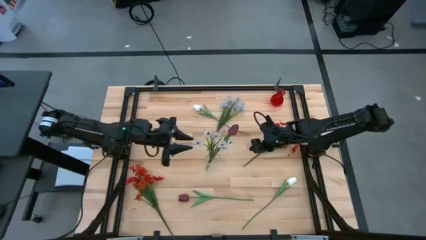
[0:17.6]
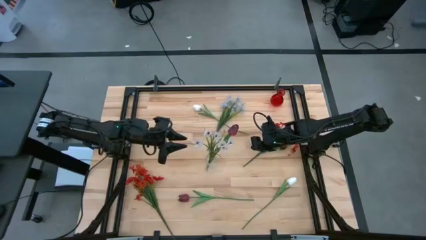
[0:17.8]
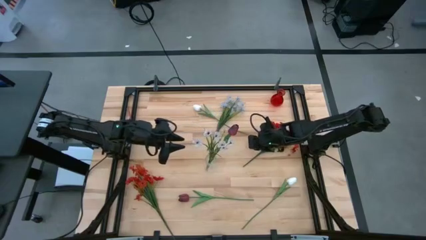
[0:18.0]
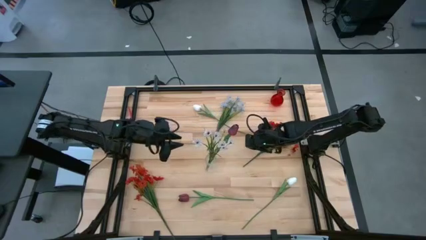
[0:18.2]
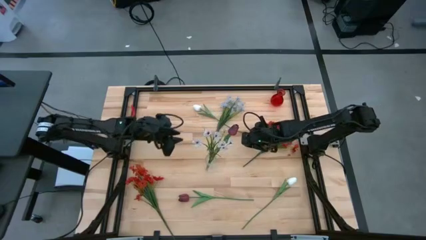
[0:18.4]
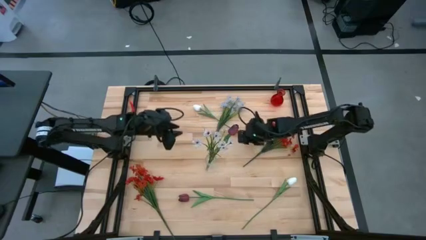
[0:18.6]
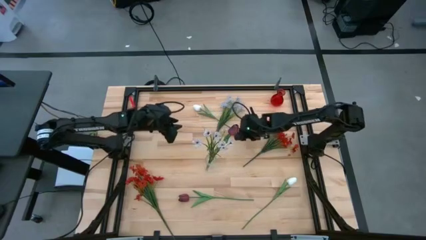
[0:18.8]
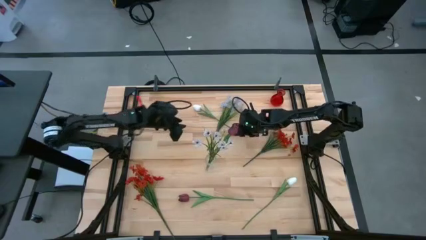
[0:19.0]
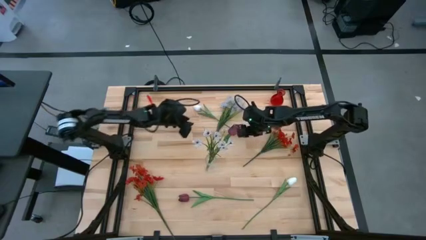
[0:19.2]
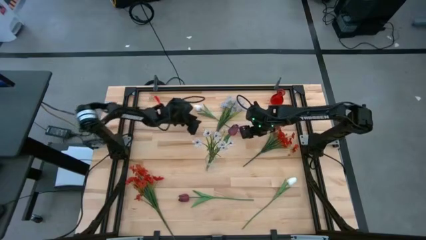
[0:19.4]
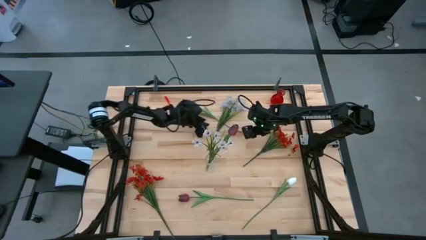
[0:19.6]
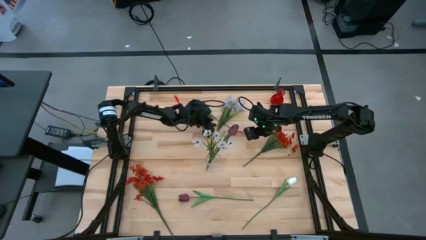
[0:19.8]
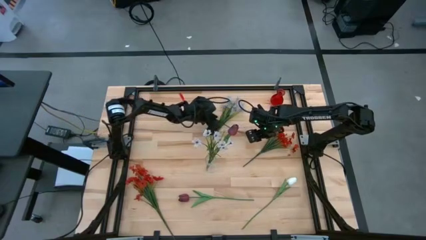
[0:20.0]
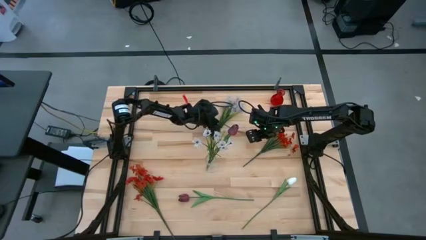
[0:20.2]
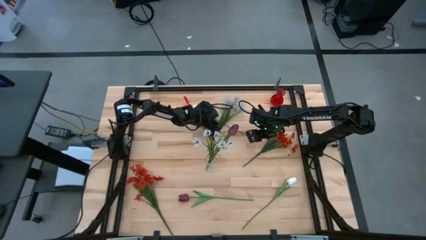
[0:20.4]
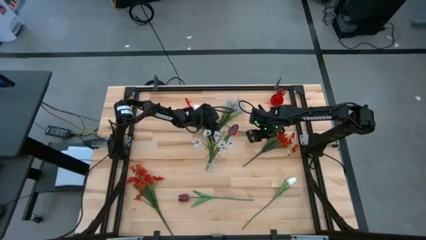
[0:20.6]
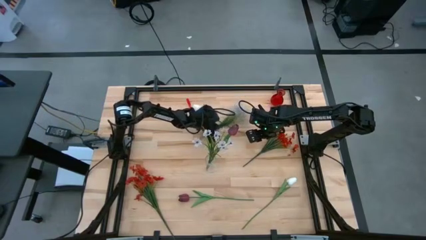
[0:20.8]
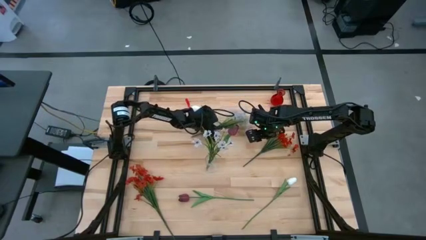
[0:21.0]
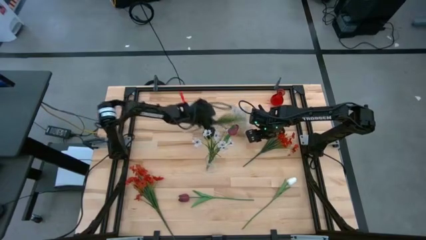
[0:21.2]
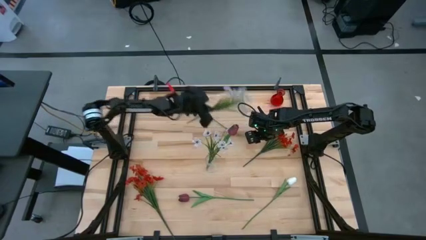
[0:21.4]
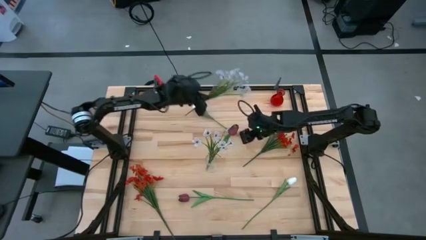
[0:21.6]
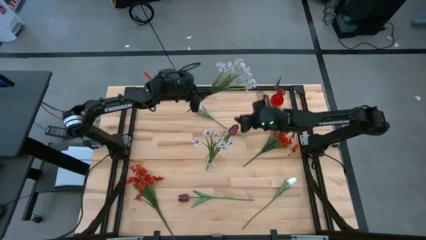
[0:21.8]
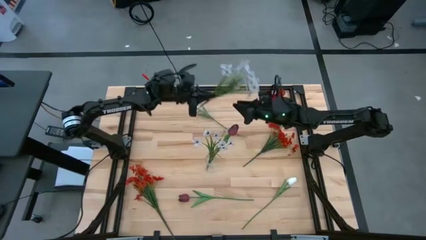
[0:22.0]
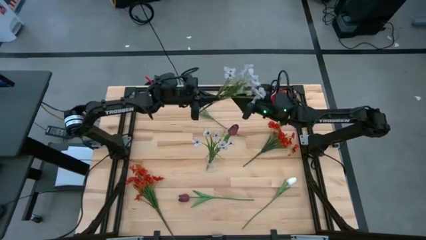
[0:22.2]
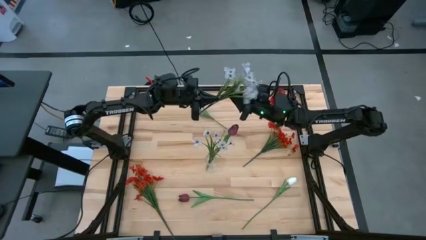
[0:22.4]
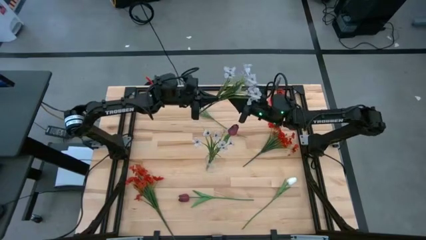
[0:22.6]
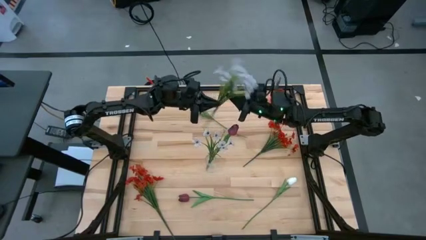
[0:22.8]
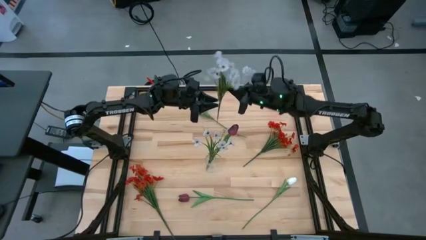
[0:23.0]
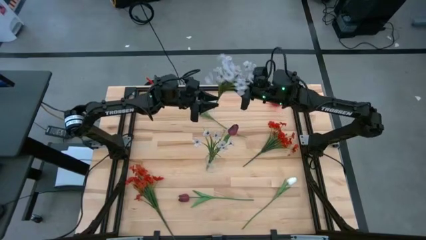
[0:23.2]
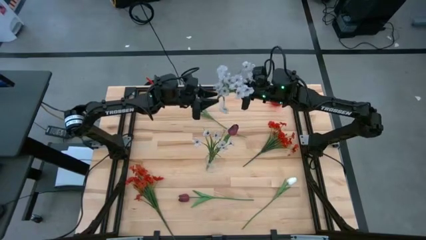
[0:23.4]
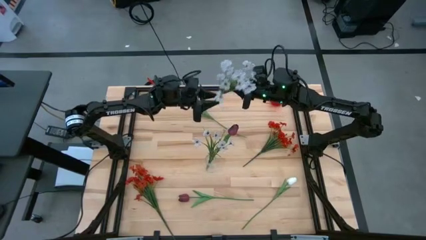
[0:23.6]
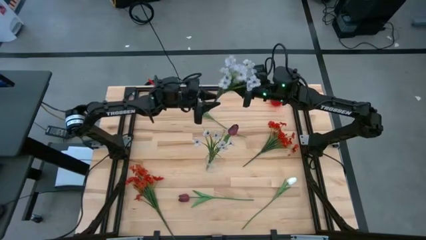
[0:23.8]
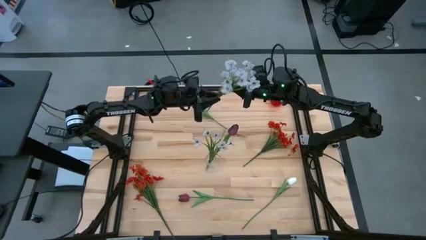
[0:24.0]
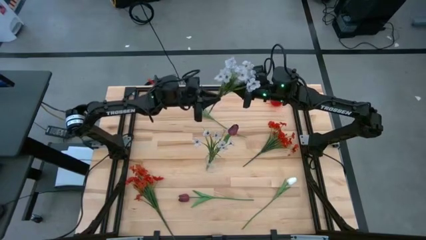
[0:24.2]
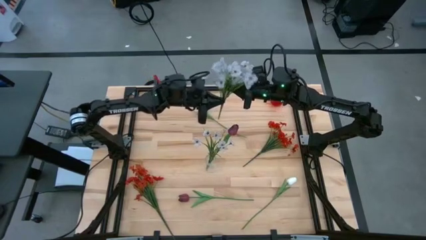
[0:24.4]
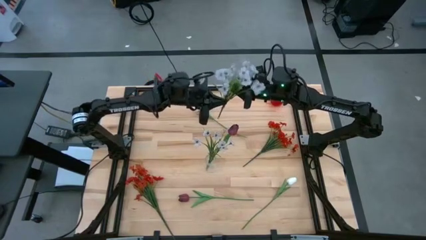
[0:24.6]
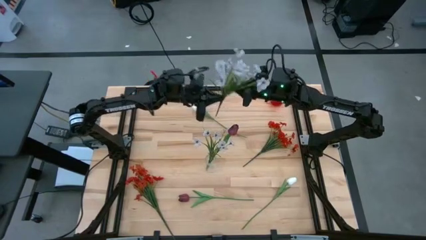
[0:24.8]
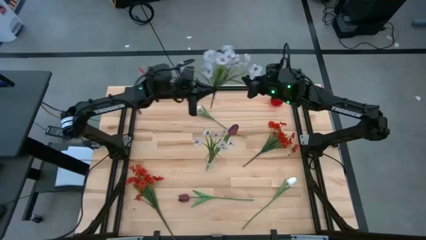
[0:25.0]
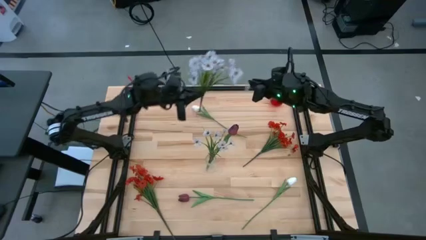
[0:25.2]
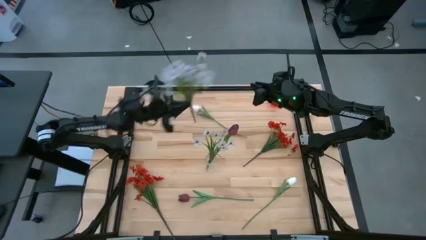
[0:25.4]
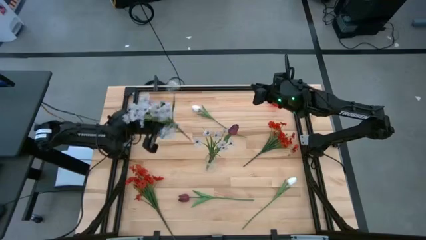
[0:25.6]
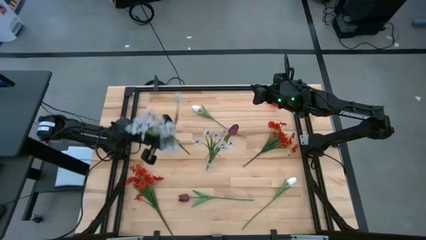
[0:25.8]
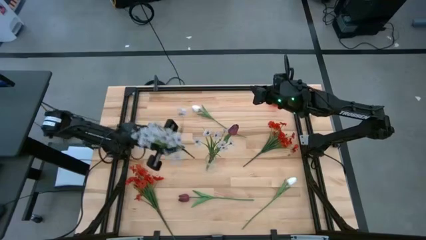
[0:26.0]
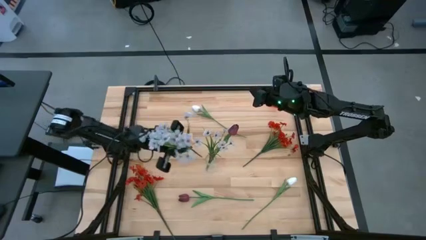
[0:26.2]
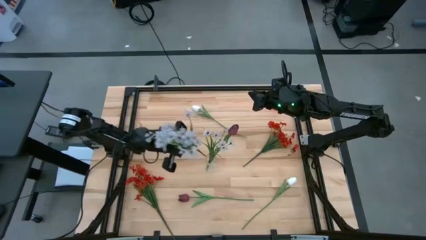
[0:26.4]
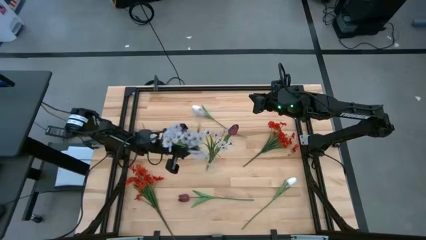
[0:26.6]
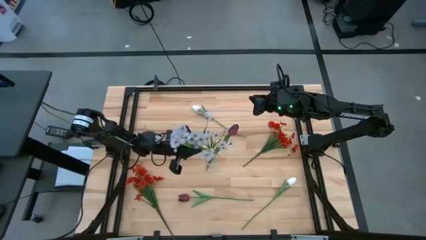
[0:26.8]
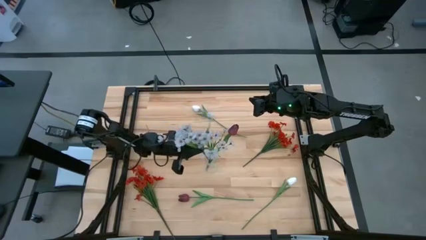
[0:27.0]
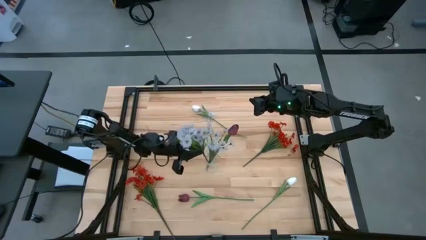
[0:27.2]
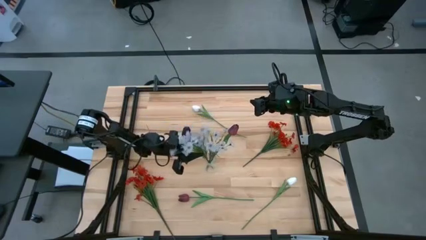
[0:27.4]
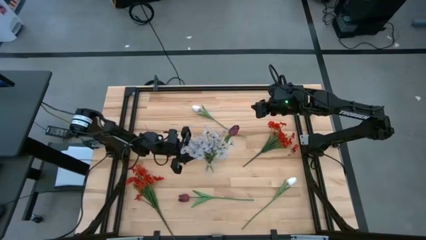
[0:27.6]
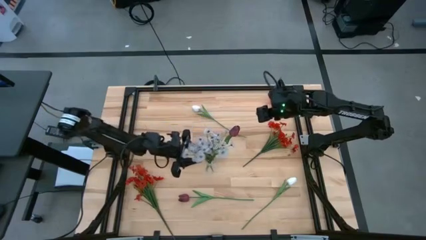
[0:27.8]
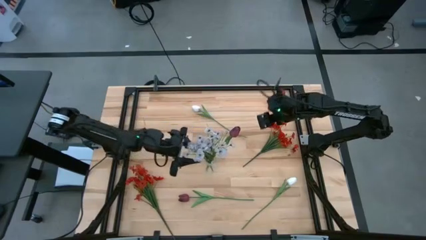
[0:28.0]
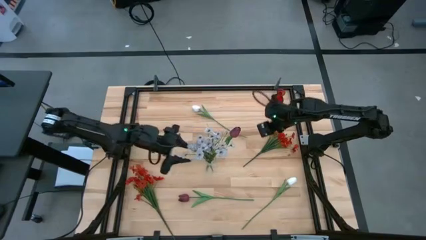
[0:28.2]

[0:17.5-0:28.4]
Task: Sort flowers into vase by color
Put the white flowers into the transparent vase

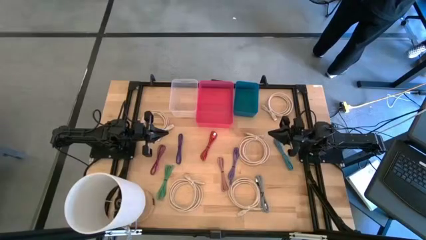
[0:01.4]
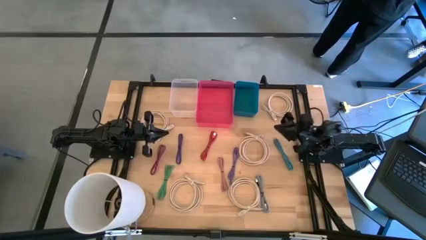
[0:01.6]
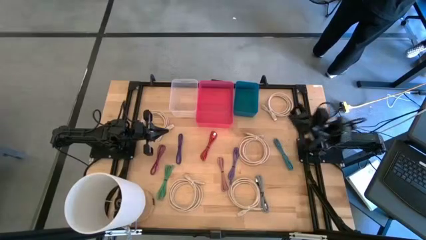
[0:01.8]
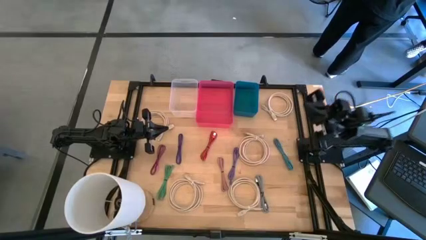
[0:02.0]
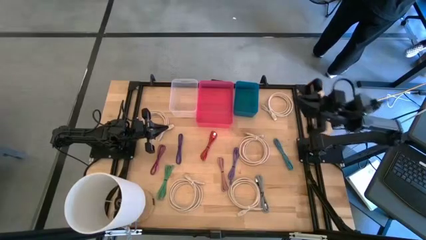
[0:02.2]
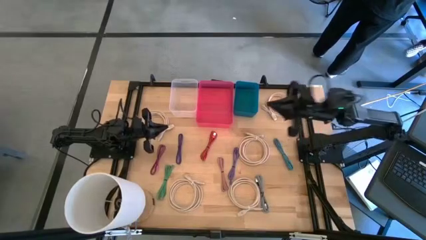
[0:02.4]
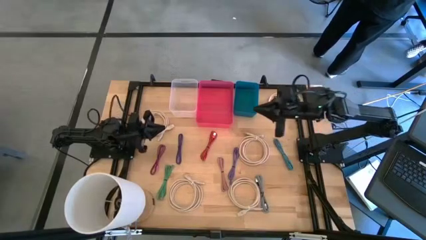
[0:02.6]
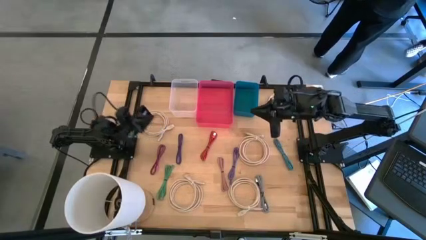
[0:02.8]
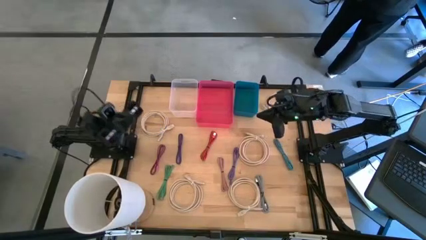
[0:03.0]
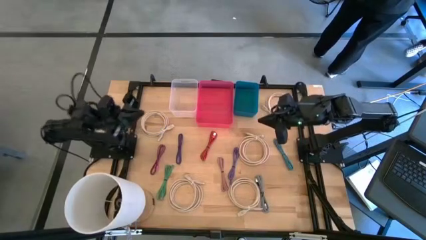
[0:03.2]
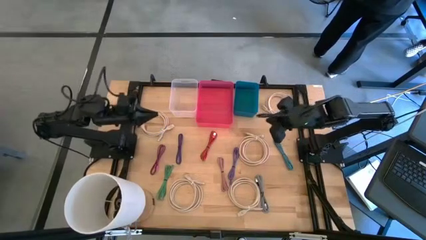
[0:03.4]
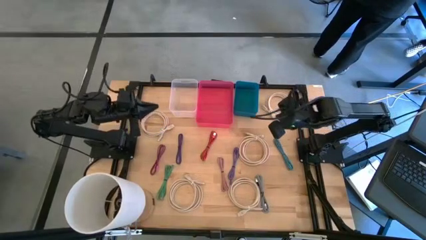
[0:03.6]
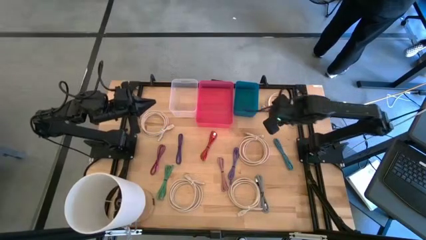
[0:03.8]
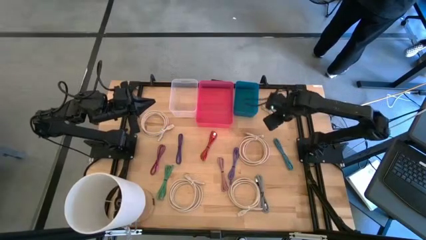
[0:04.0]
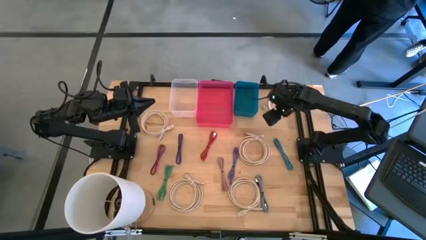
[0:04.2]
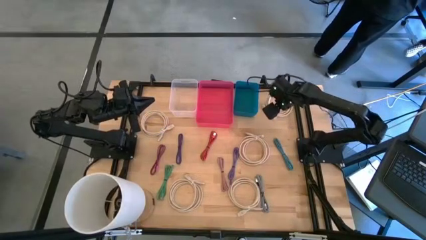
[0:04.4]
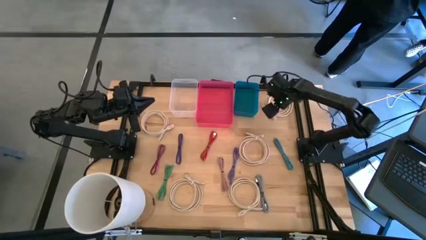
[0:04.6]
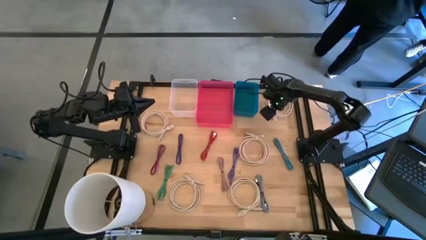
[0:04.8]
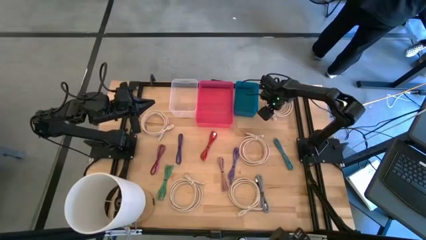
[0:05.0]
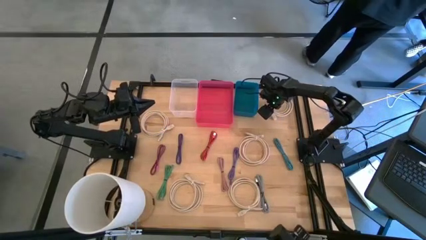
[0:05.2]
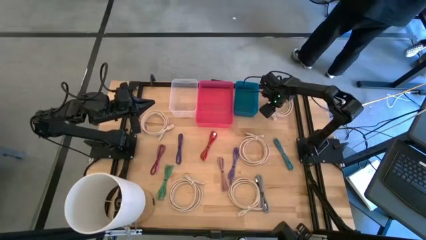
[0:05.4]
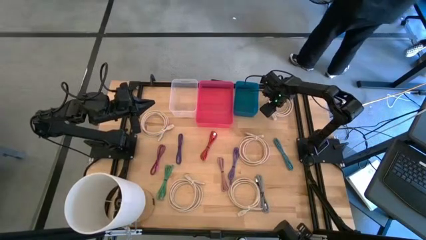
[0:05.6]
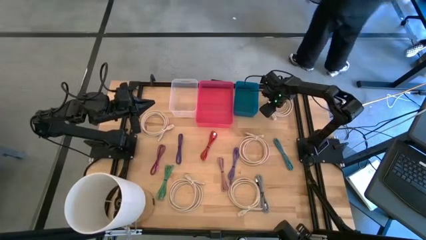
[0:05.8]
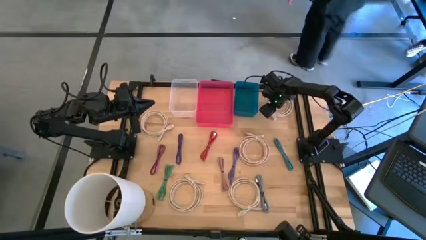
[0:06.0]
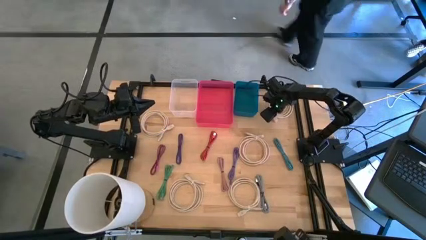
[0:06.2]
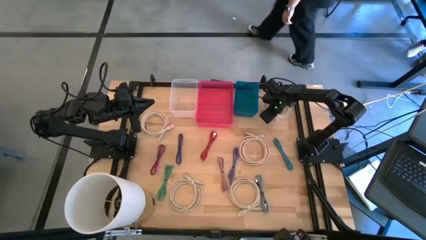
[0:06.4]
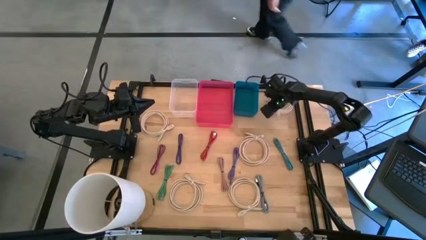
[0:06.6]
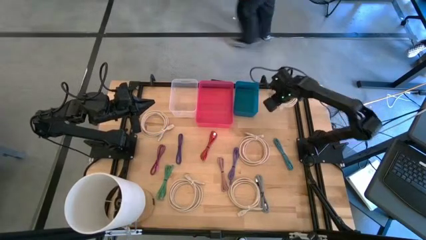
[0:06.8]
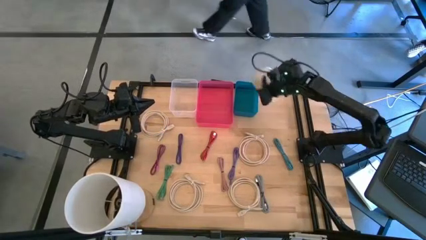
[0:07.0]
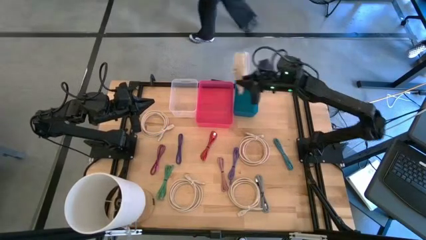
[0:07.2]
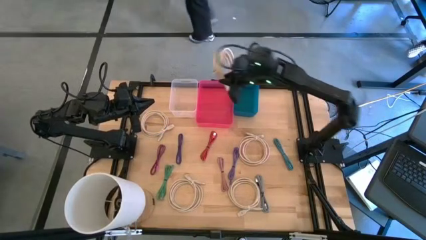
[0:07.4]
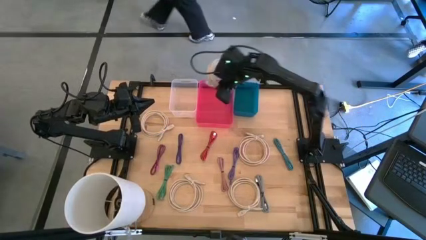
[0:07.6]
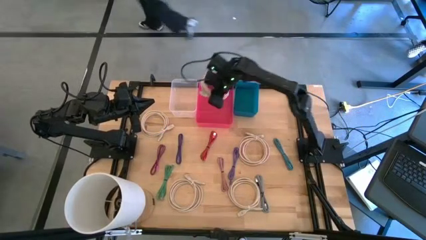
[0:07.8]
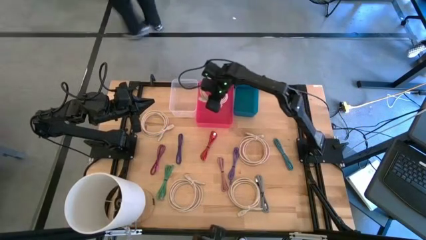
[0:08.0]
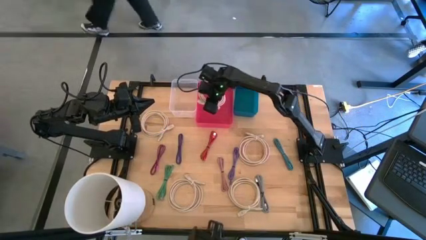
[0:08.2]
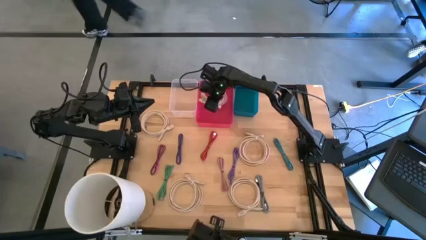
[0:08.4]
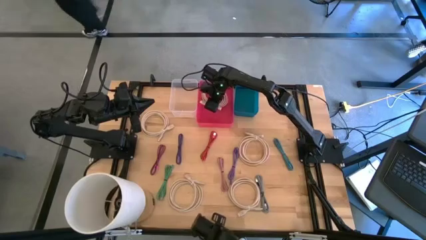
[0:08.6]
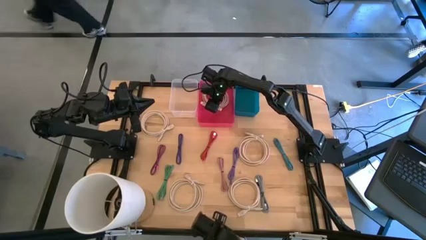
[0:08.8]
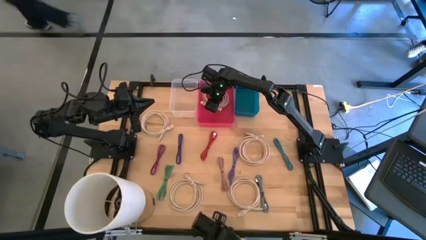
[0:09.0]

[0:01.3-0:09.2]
Task: Pick & Place USB Port
Put the white HDMI cable into the pink bin
